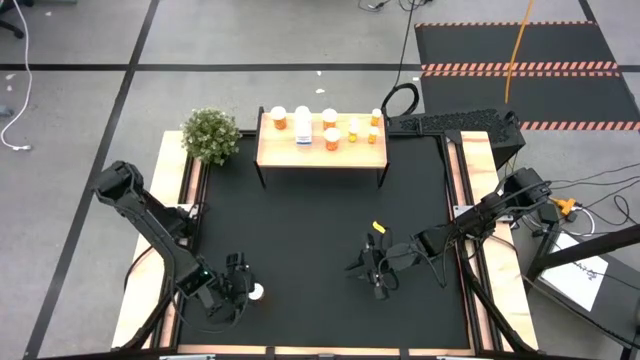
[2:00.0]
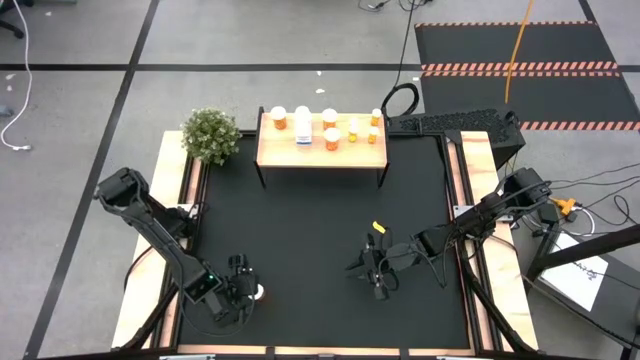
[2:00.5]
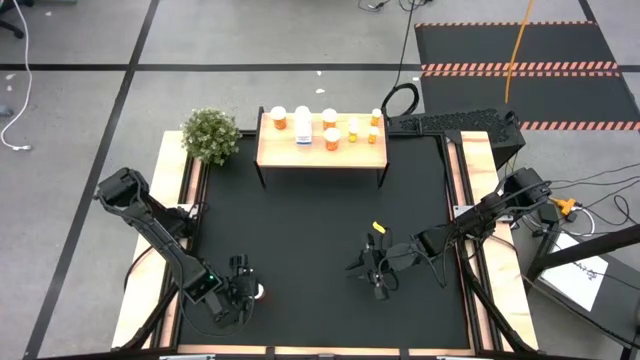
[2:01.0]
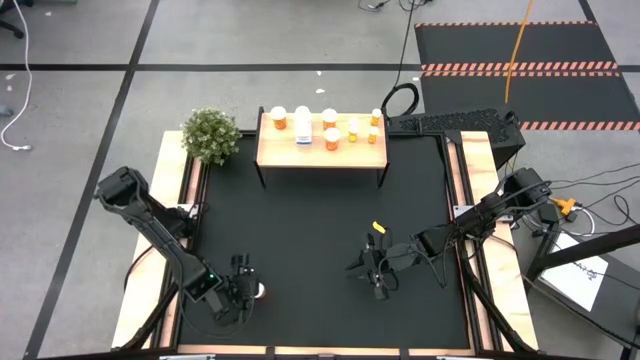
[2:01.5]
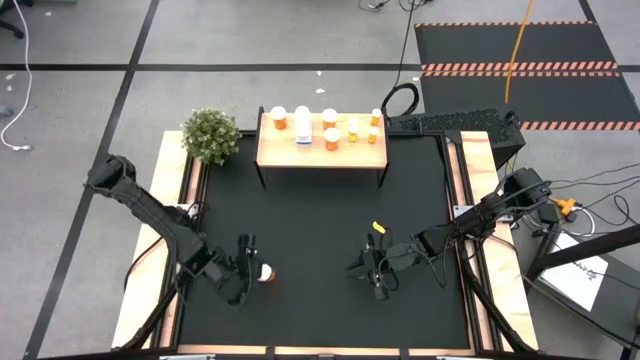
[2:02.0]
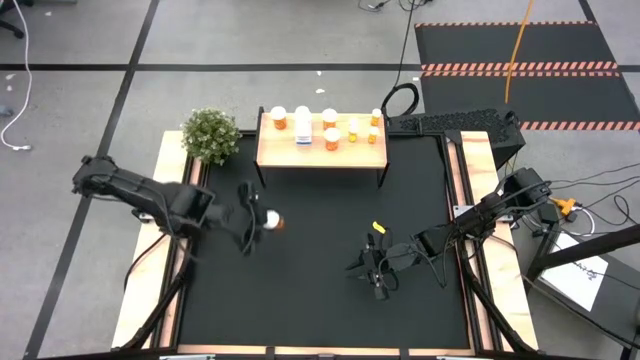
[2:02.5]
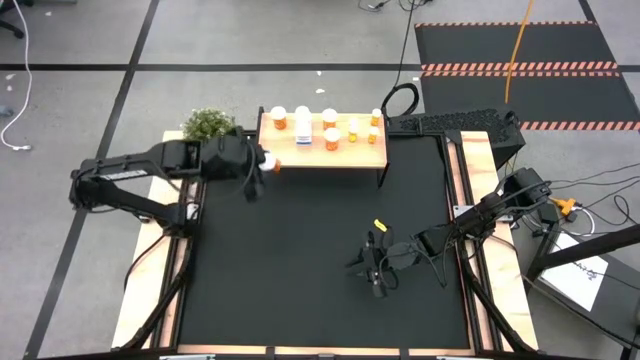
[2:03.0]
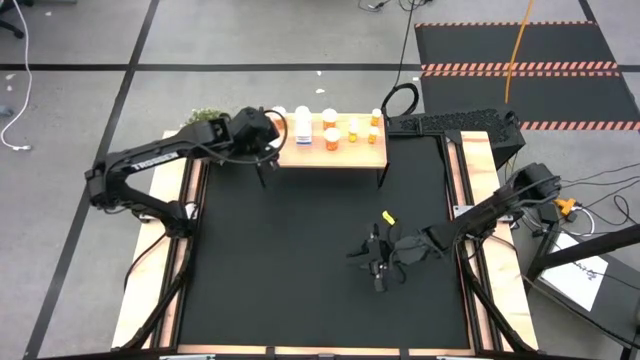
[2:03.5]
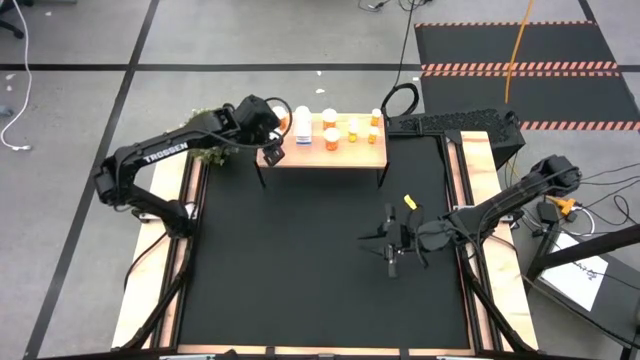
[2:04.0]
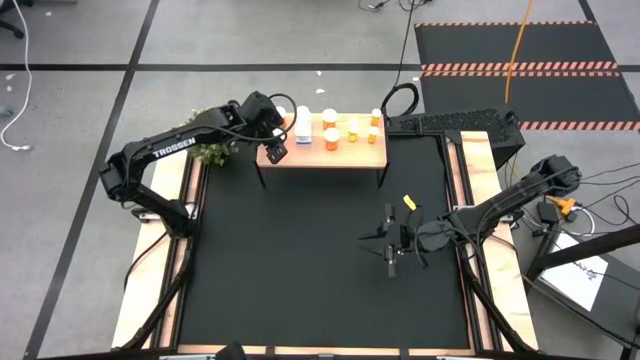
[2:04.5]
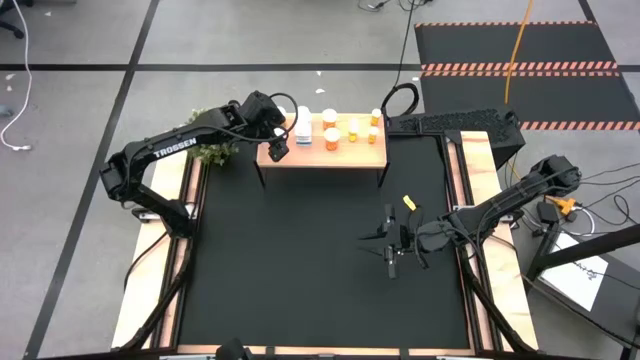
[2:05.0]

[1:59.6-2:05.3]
Task: Pick and place medicine bottles onto shelf by color
Put the large orange pill bottle on the shelf aligned with the other large orange pill bottle

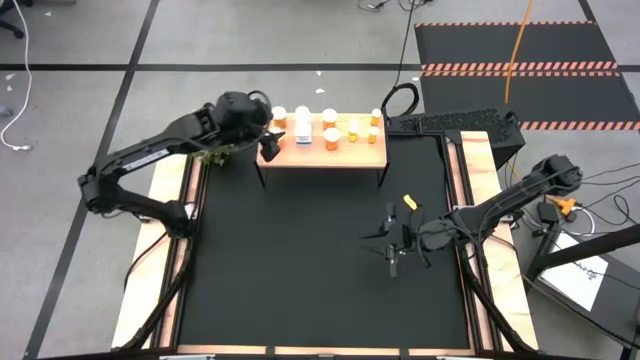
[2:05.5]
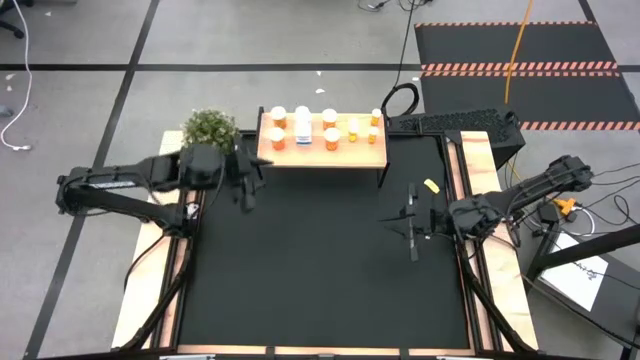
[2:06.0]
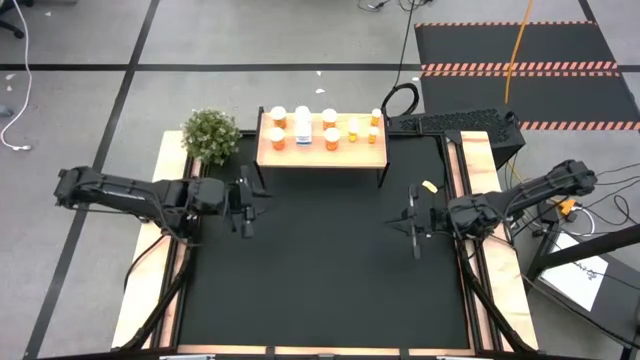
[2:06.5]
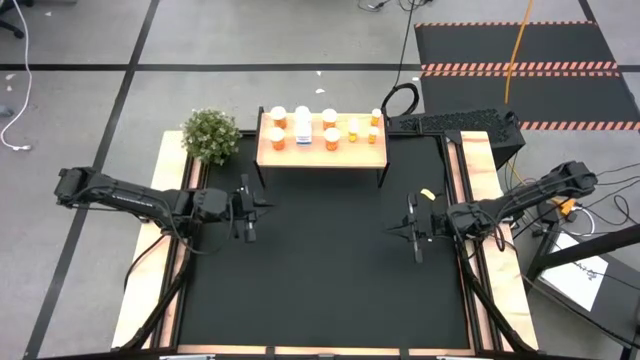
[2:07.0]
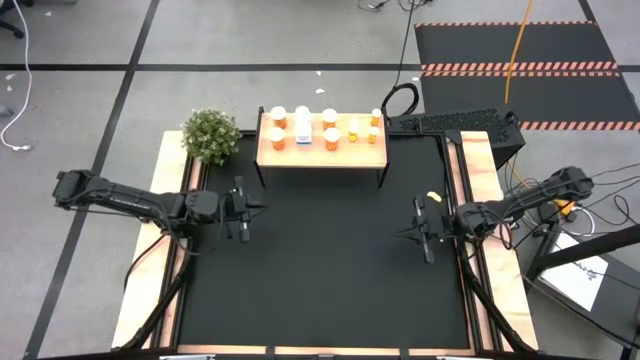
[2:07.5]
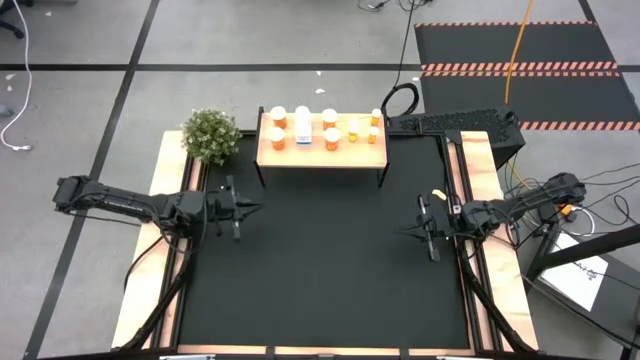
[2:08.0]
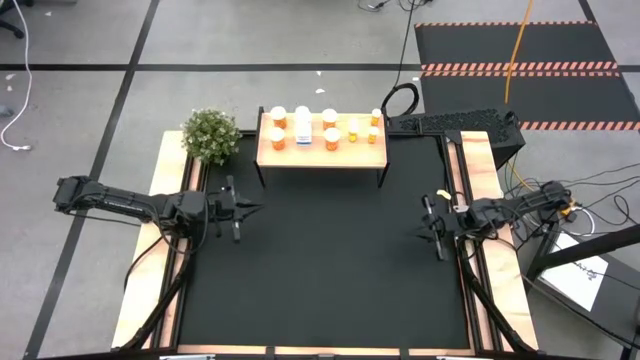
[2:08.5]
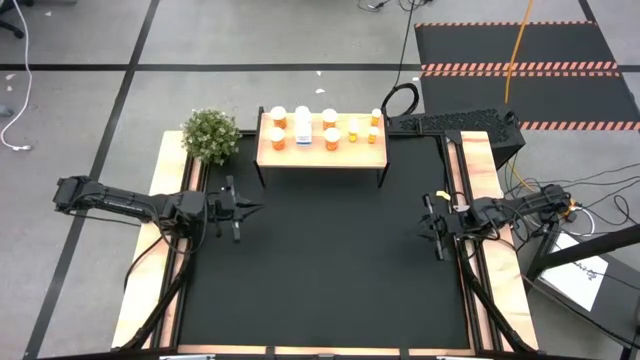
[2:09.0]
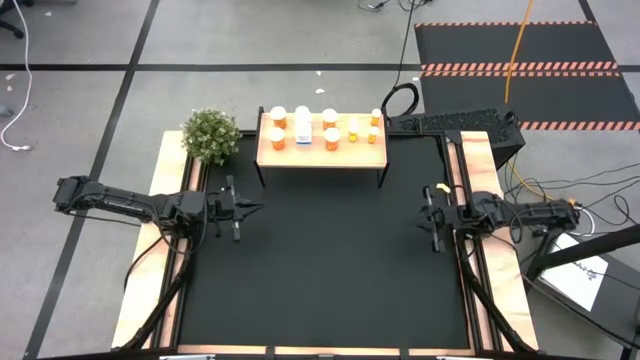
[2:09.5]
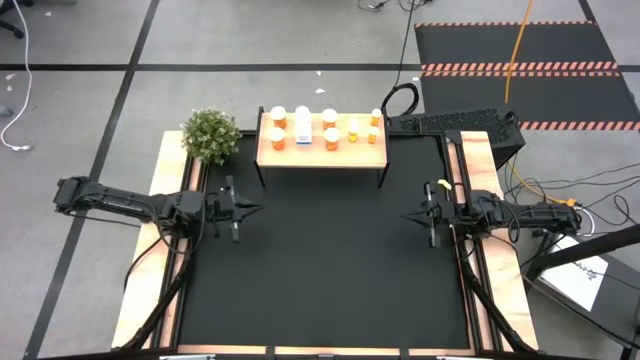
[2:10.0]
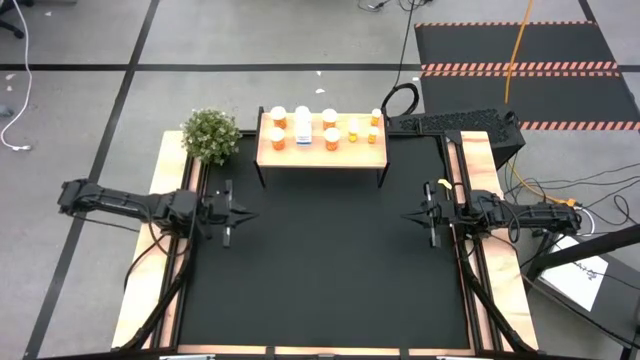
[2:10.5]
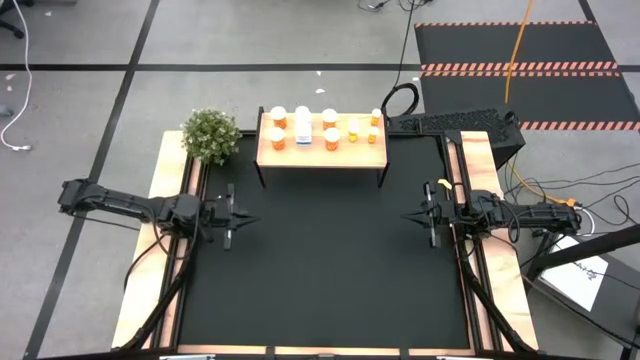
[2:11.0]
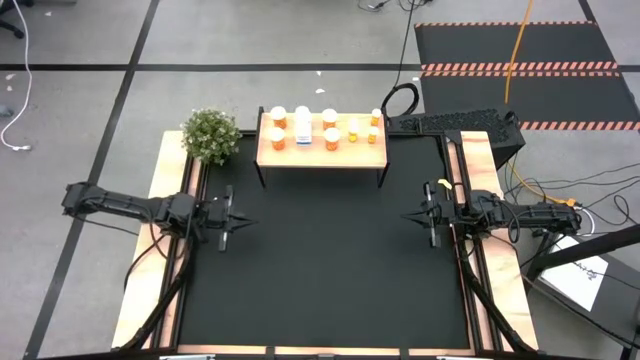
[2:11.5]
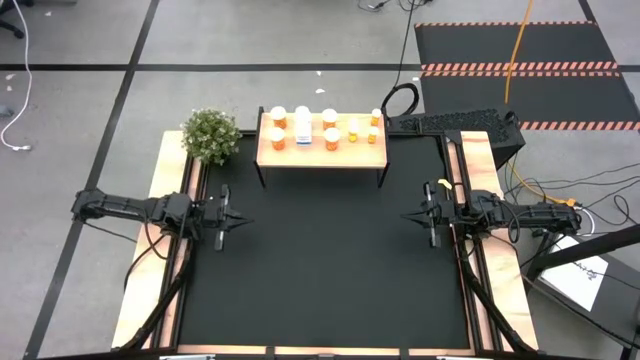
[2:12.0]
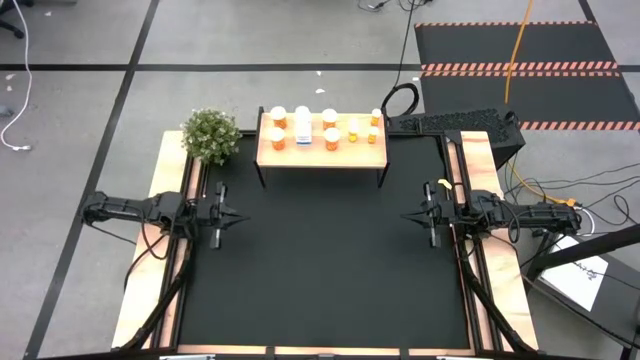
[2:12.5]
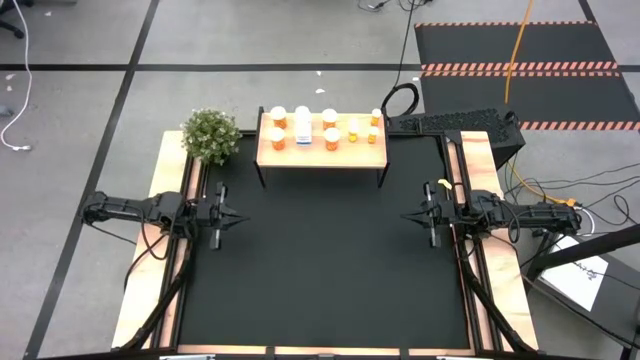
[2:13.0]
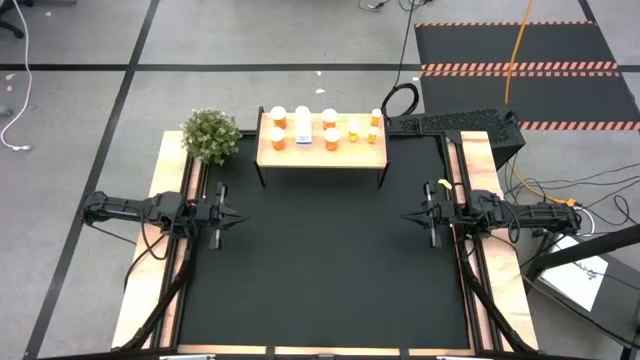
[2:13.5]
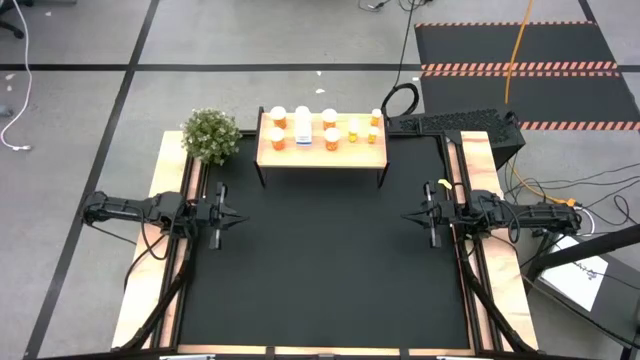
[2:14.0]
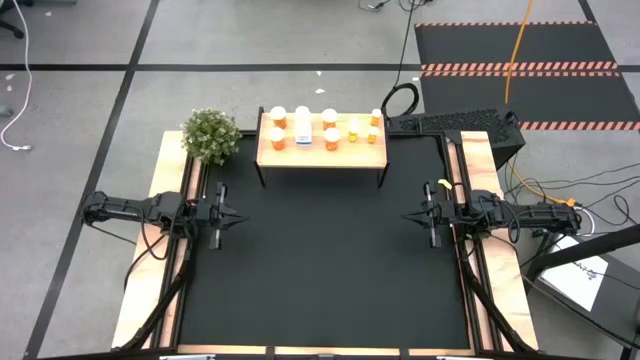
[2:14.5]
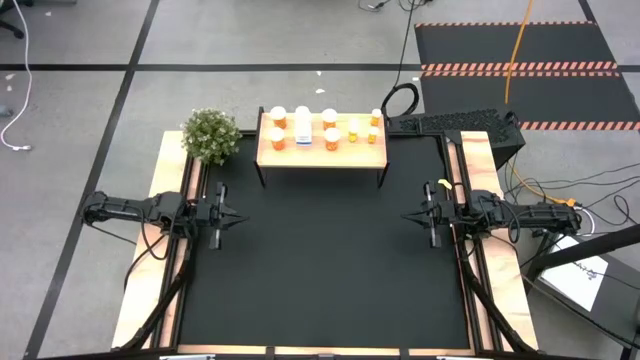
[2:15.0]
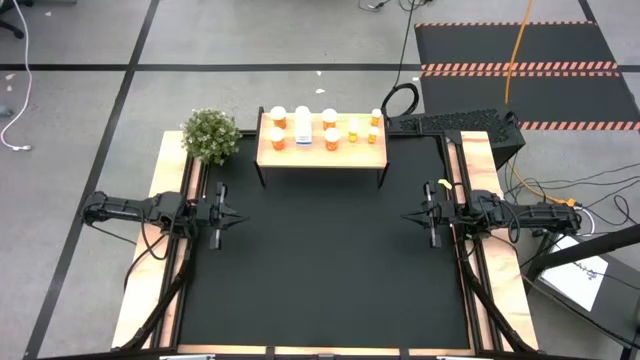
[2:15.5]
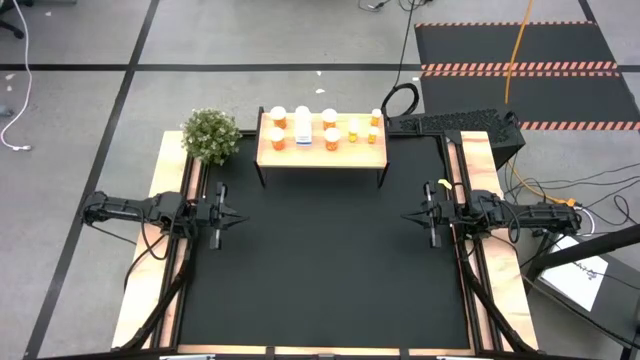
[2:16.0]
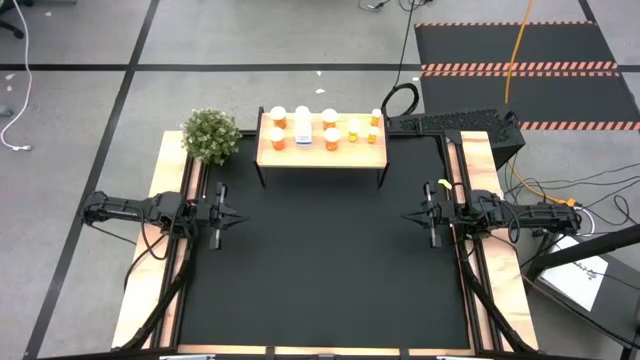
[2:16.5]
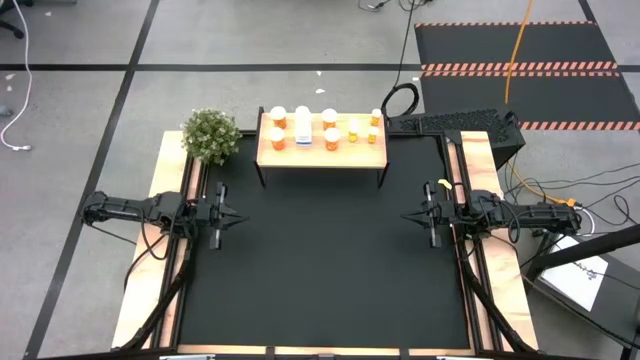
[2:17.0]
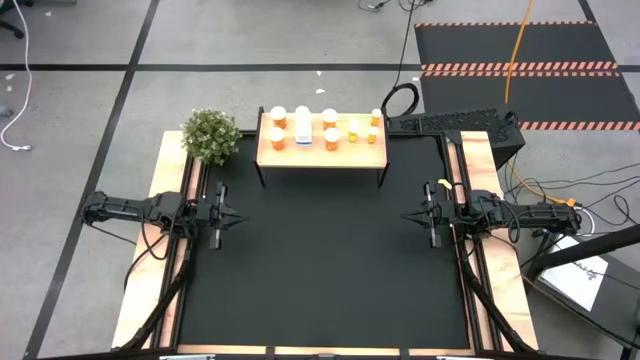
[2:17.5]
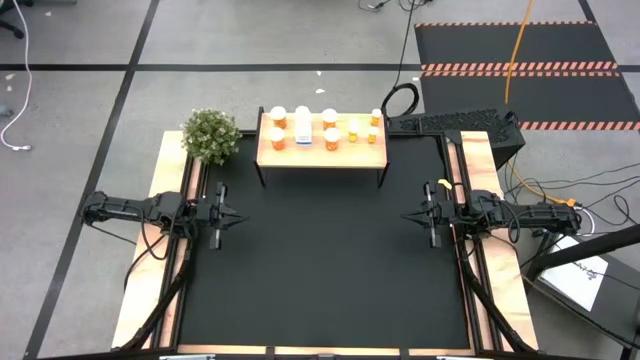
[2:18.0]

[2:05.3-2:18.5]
Return to home position

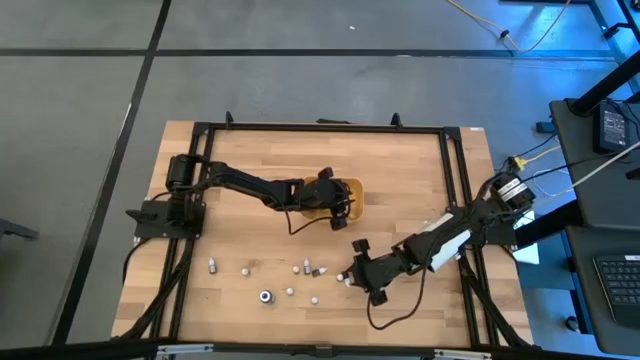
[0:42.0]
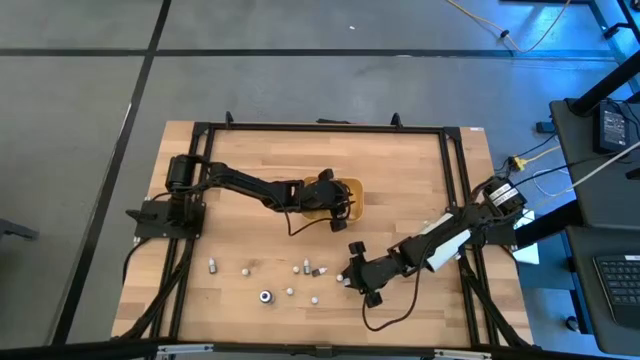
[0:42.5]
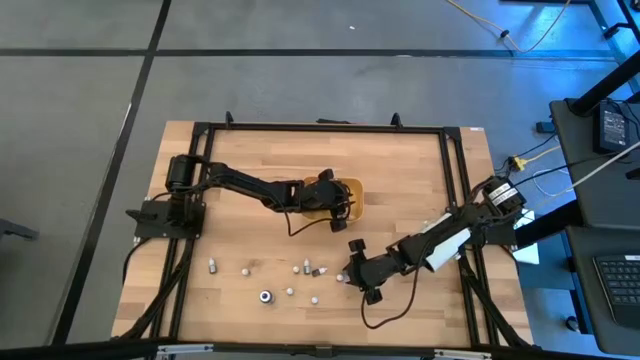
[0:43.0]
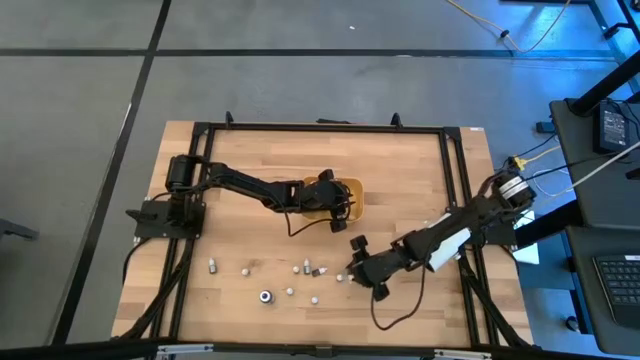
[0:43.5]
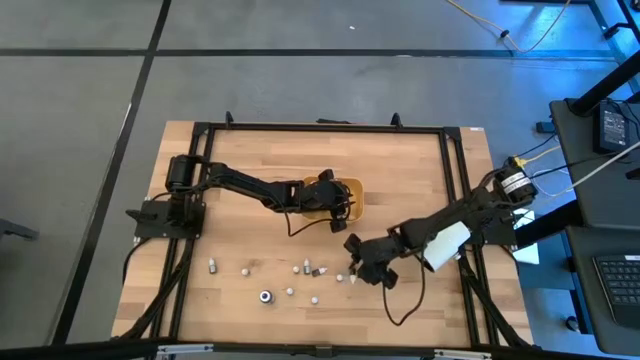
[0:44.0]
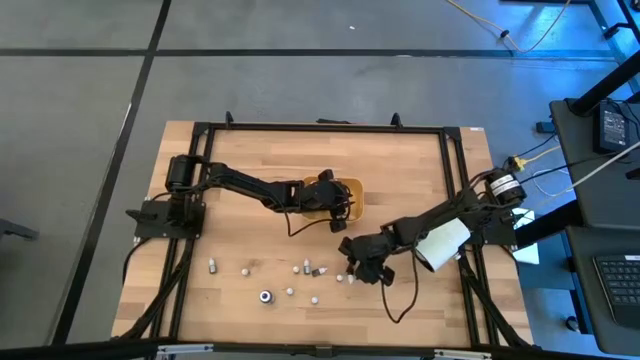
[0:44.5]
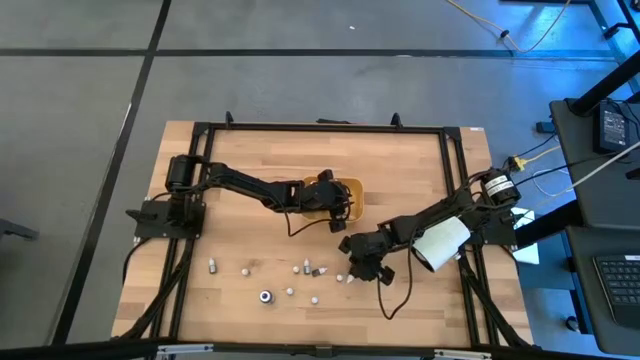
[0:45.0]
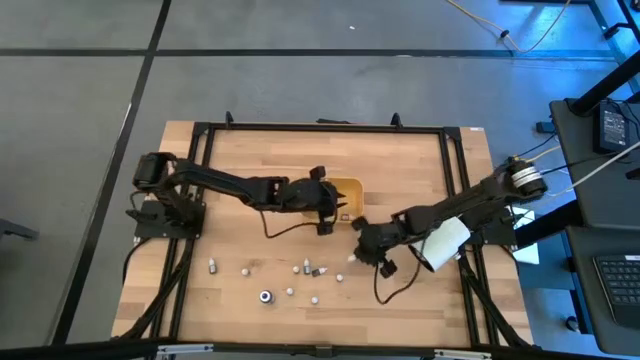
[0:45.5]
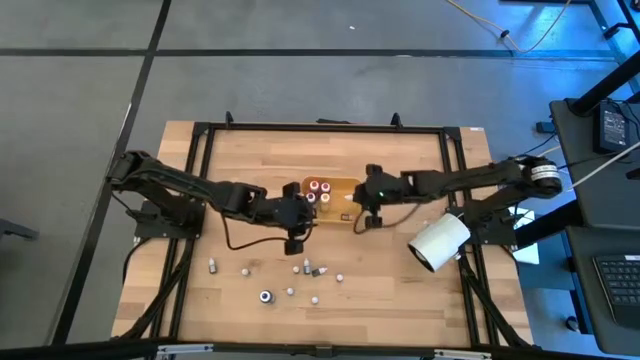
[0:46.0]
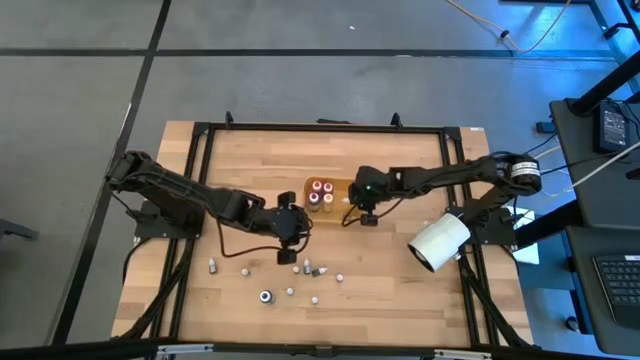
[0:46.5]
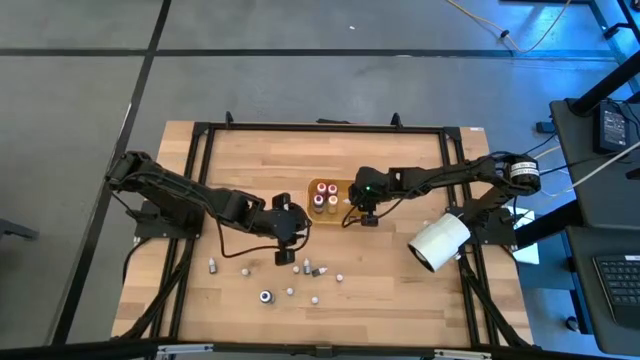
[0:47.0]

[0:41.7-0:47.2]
Task: Pick & Place food coloring
Put the small black food coloring bottle into the yellow bin
